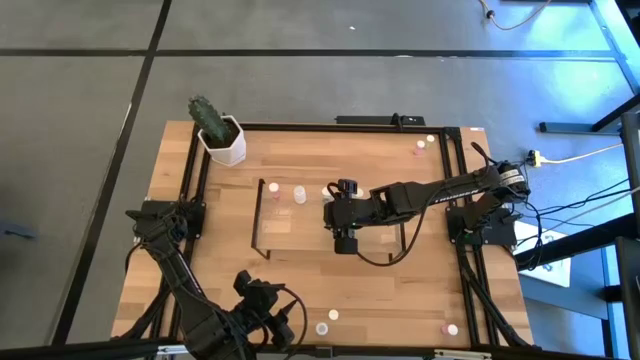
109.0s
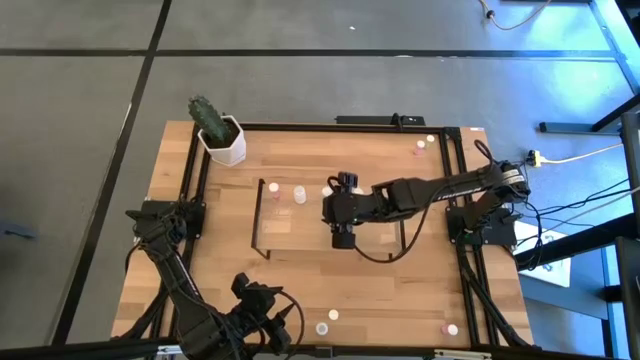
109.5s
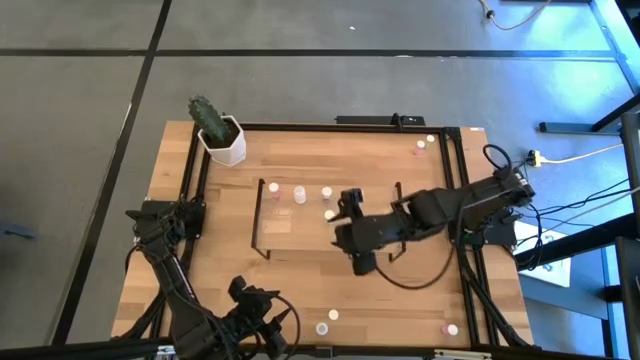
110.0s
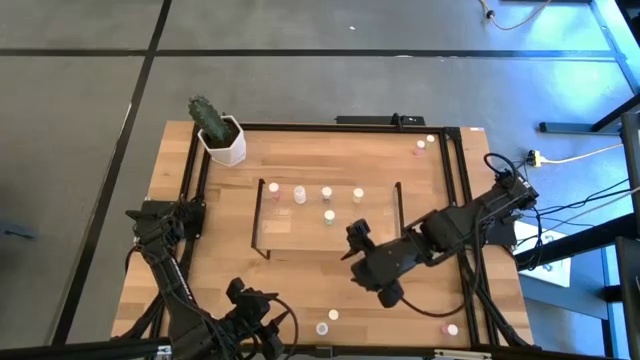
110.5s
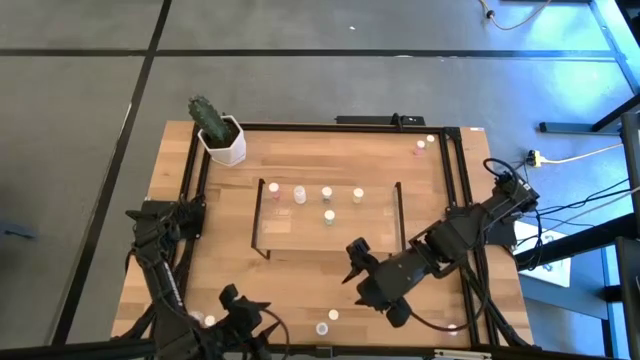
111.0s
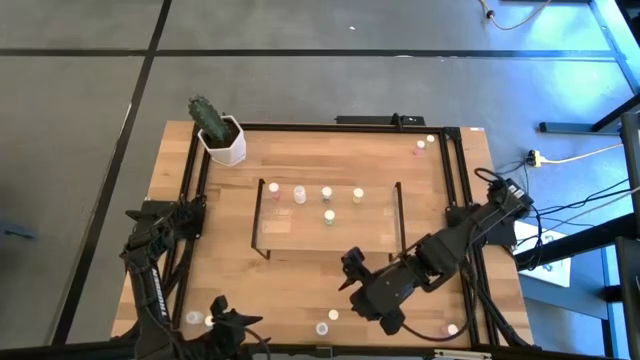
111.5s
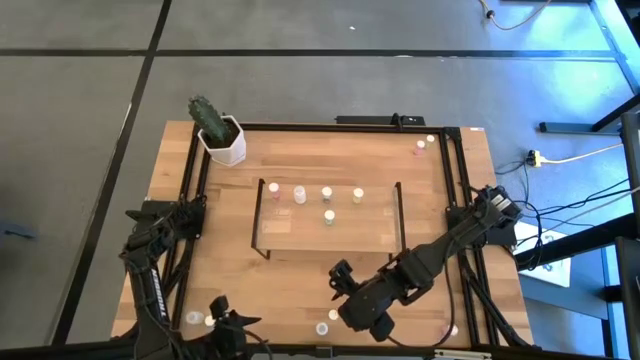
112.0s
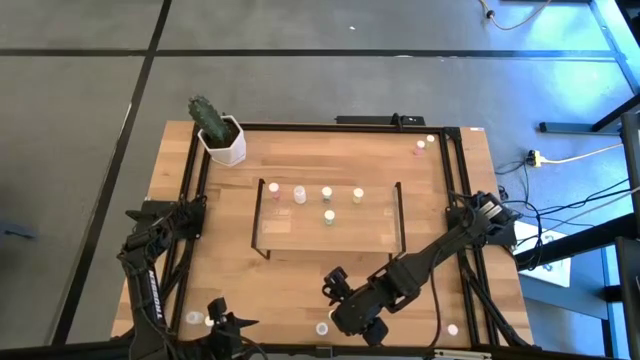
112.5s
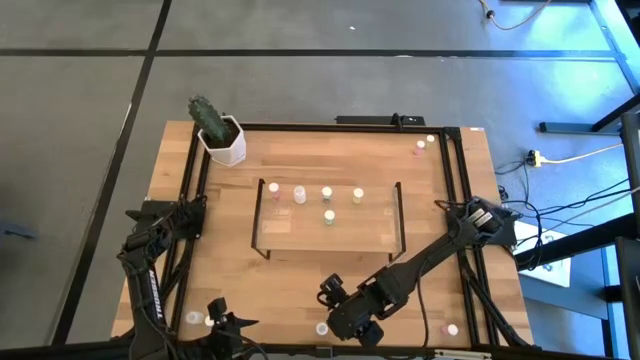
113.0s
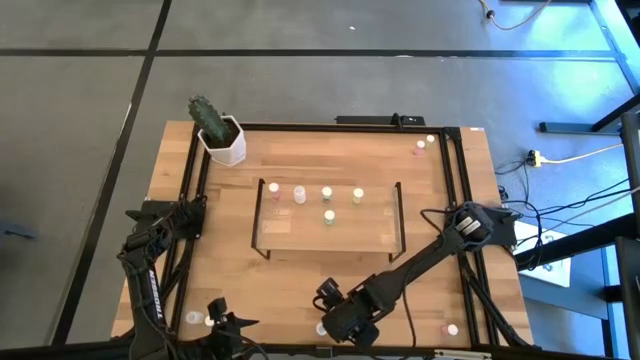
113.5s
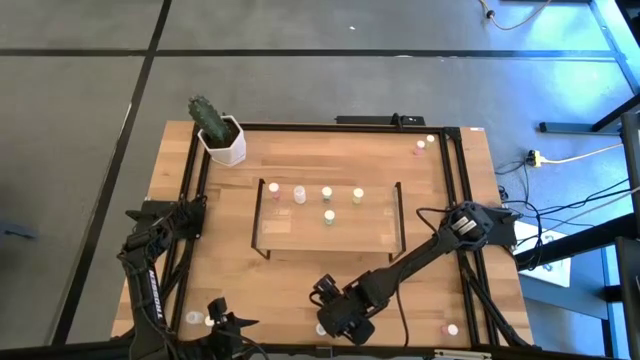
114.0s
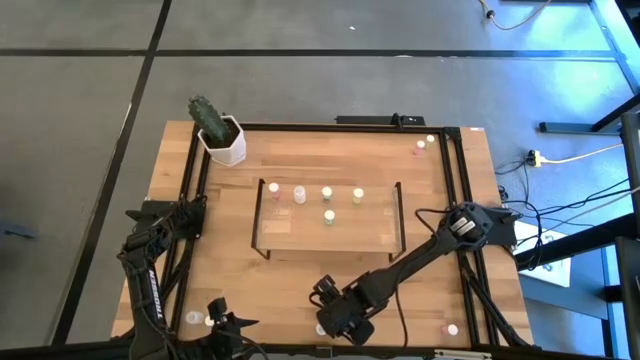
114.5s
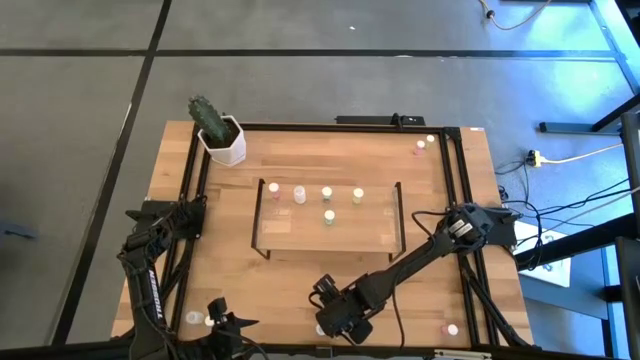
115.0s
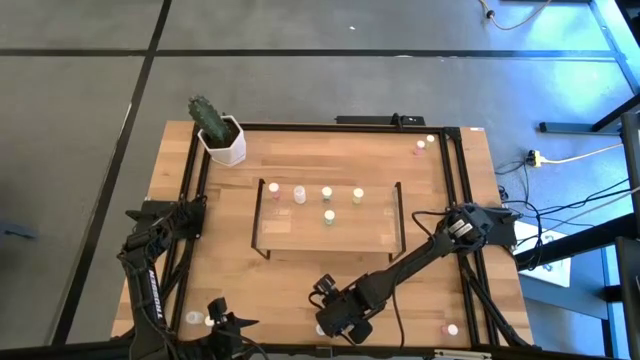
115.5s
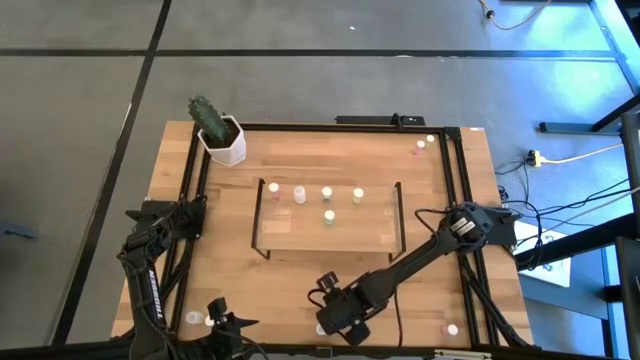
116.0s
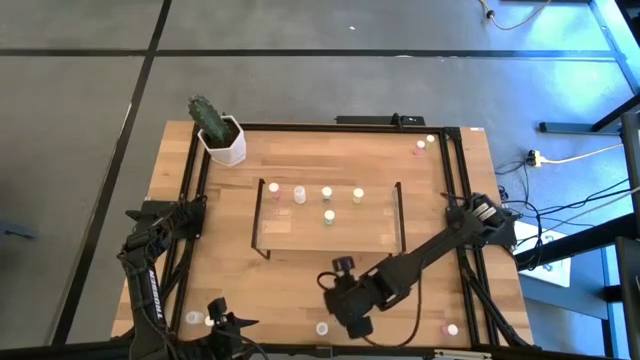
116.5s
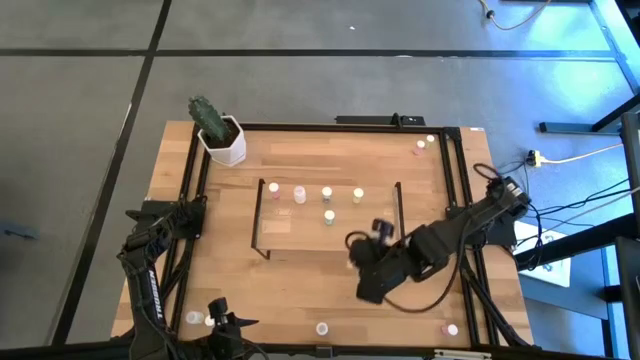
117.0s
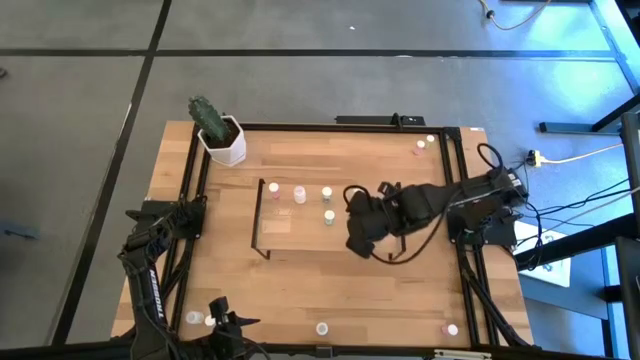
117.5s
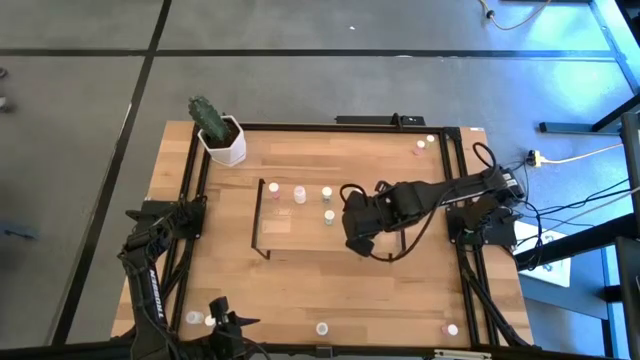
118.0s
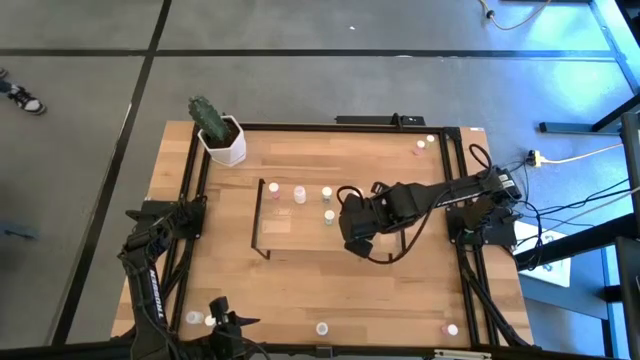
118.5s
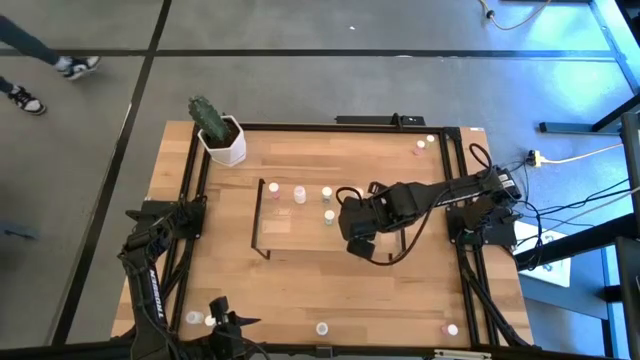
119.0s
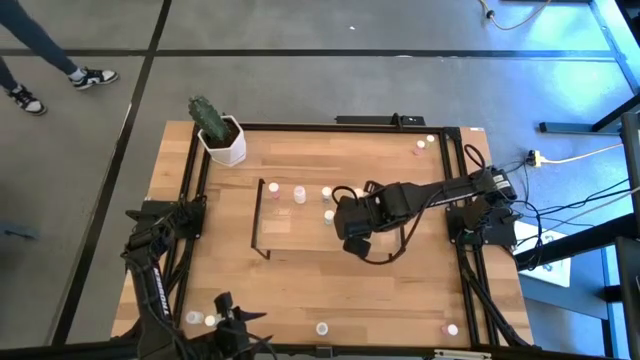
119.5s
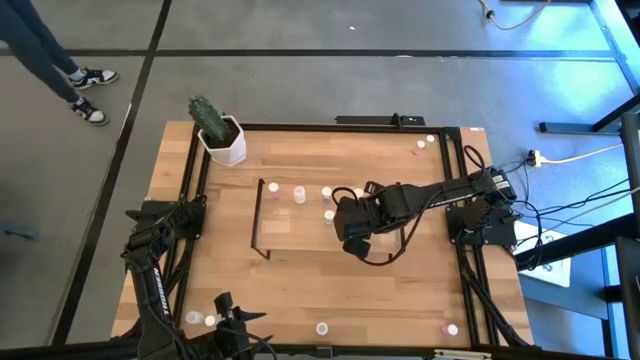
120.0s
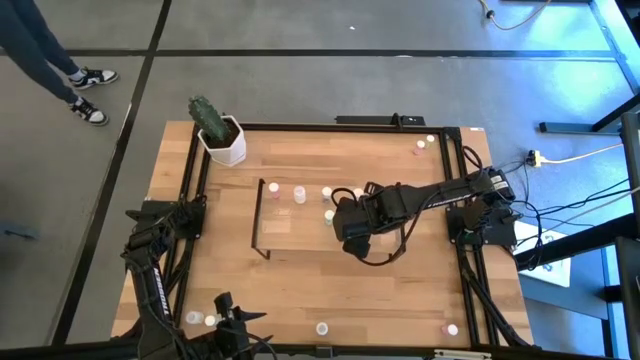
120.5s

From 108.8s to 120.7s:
Task: Pick and place medicine bottles onto shelf by color
Put the bottom yellow pill bottle on the shelf aligned with the other yellow pill bottle

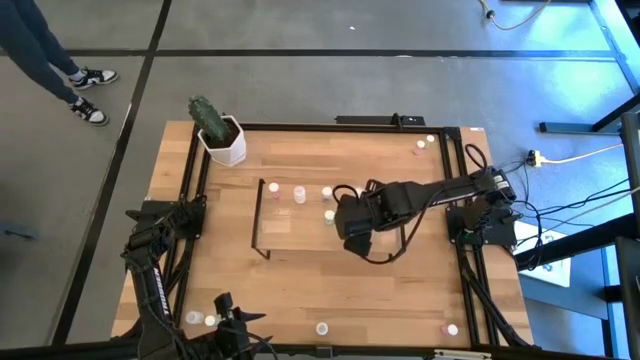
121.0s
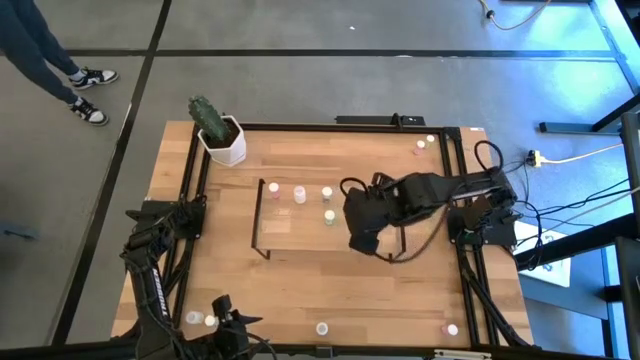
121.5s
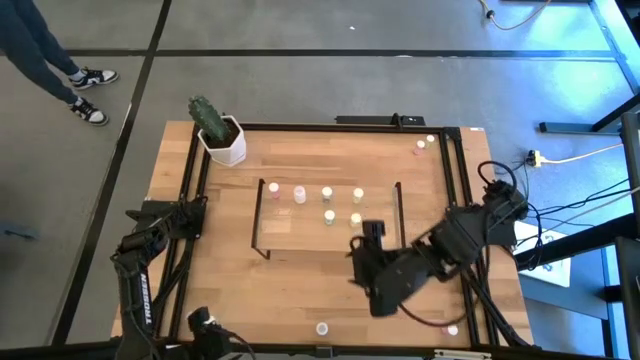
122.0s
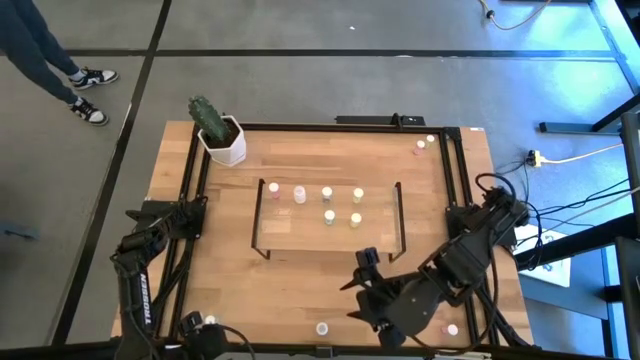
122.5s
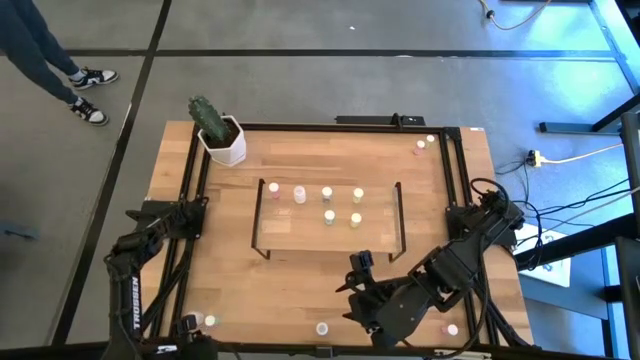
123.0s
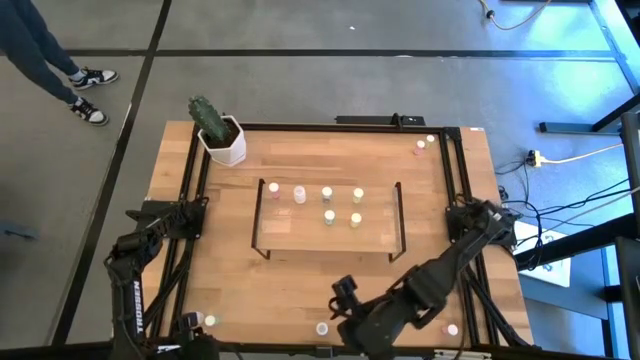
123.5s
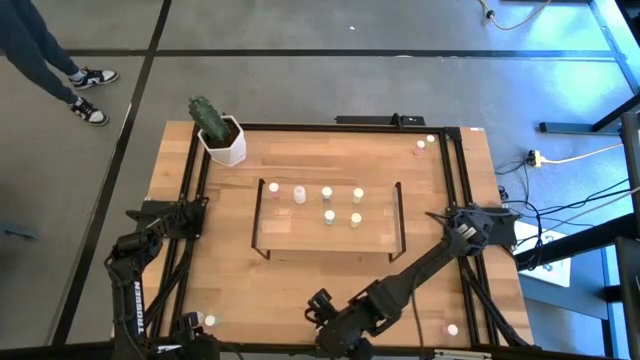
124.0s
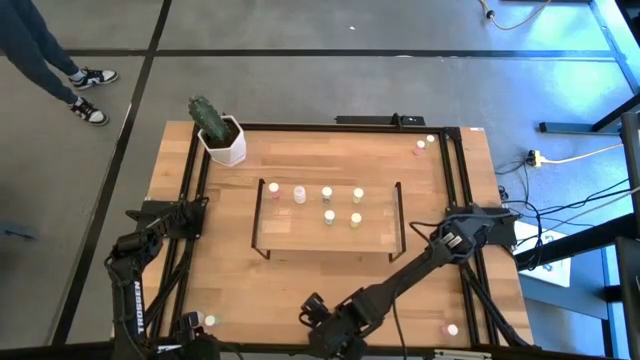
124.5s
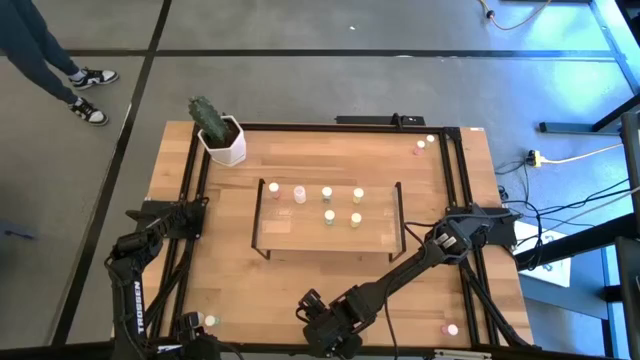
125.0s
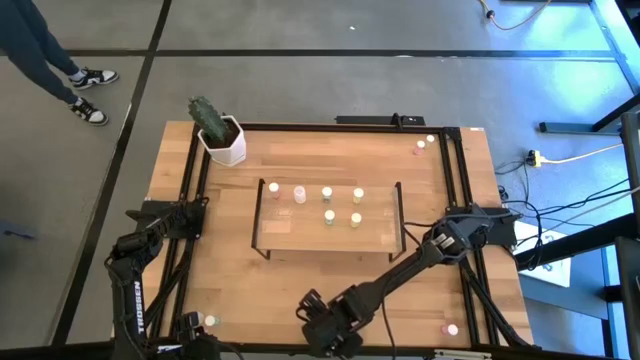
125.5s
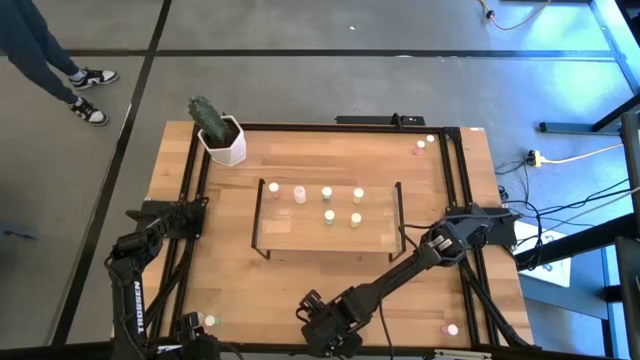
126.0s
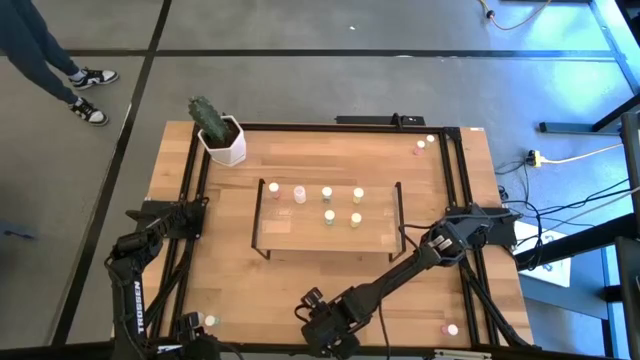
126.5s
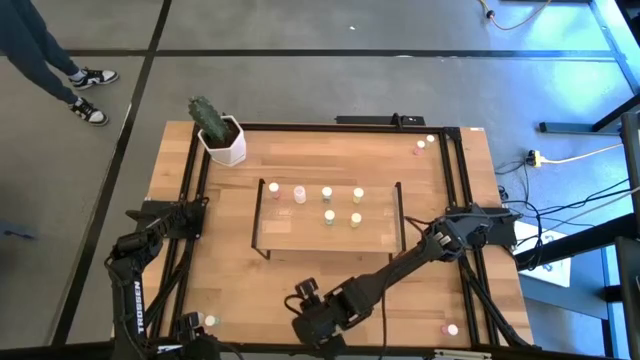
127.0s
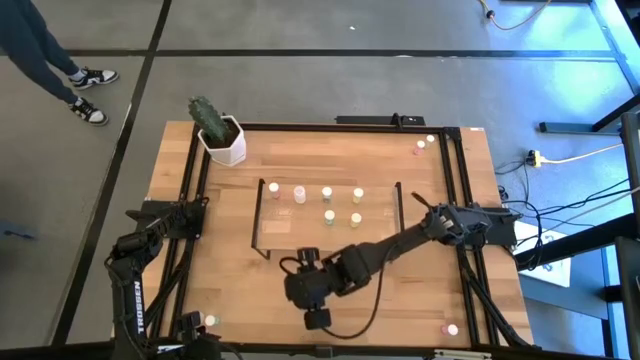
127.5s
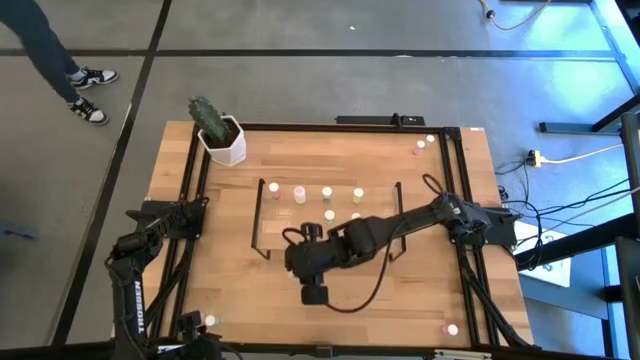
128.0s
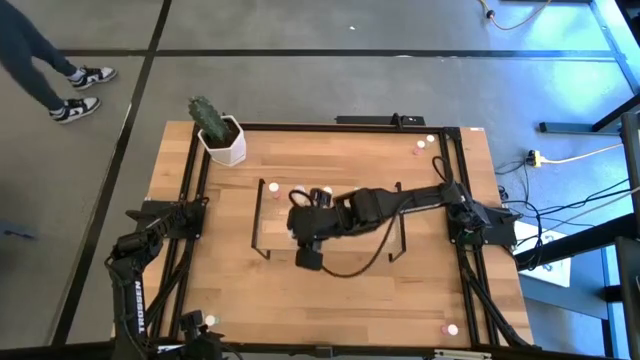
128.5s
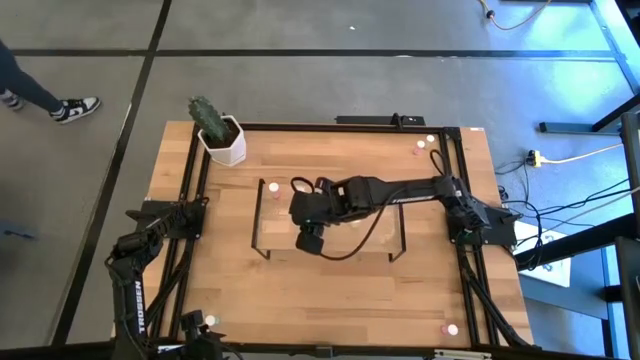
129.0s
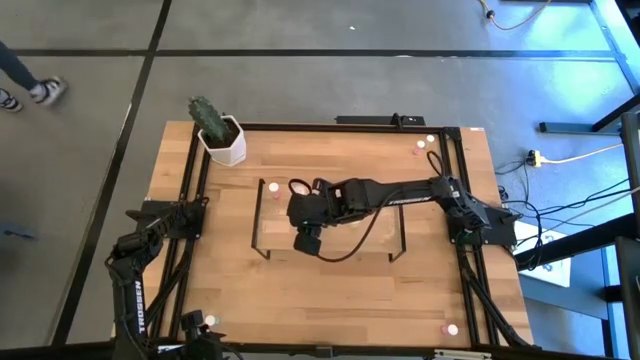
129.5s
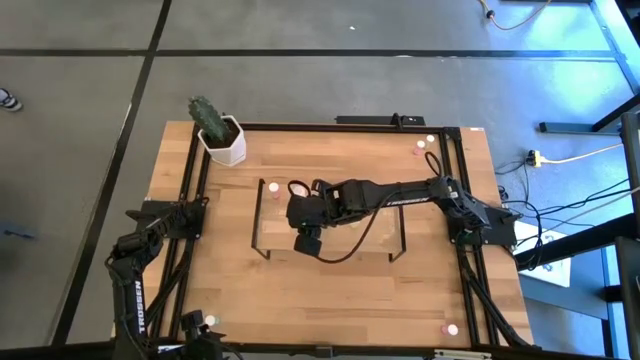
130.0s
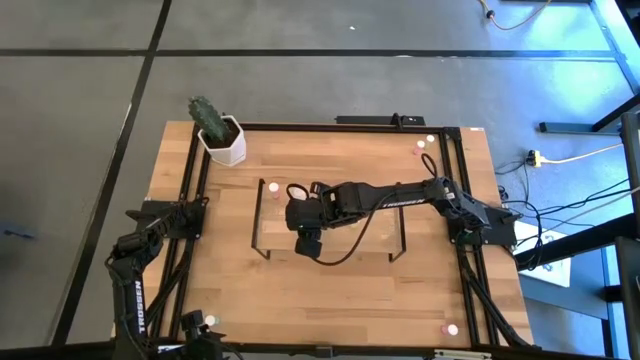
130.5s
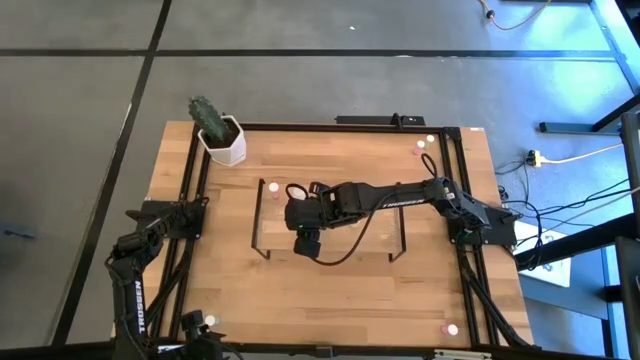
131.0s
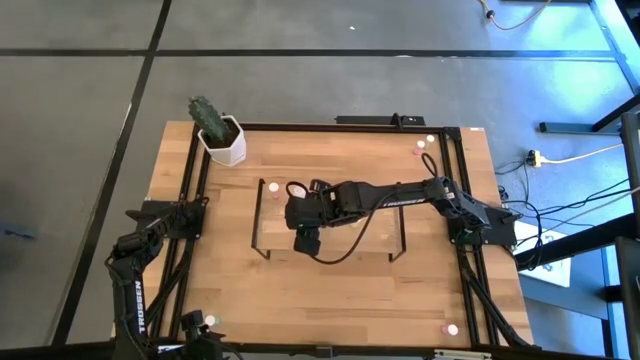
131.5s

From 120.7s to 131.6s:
Put the right white pill bottle on the shelf aligned with the other white pill bottle
